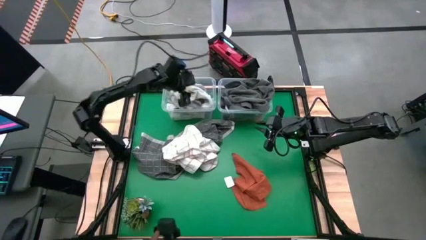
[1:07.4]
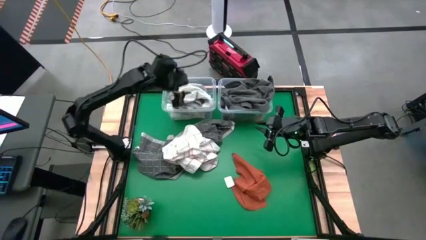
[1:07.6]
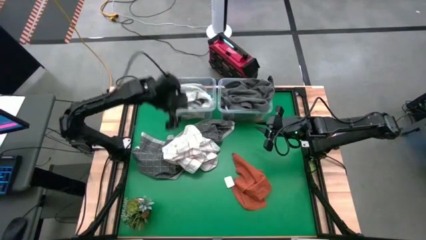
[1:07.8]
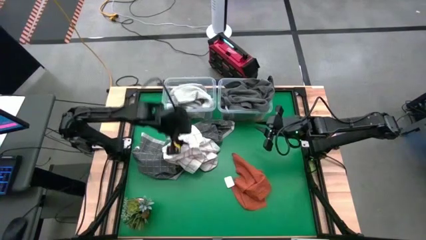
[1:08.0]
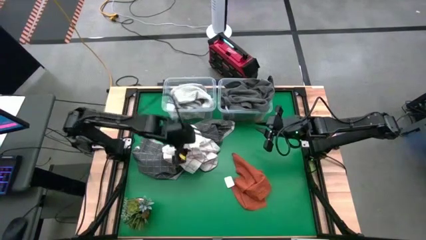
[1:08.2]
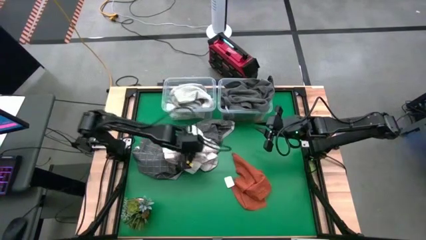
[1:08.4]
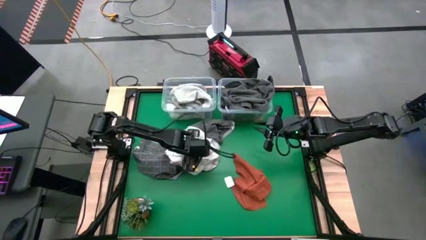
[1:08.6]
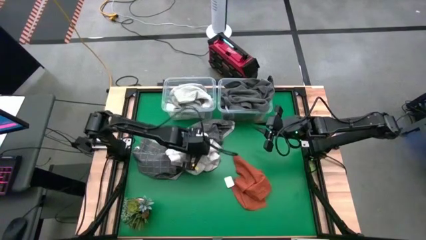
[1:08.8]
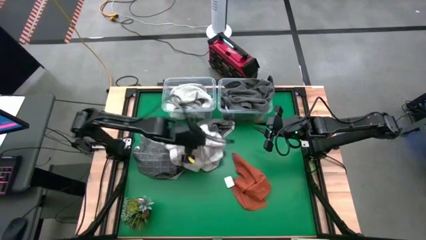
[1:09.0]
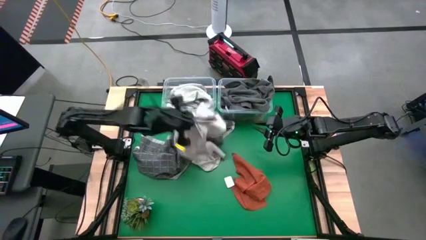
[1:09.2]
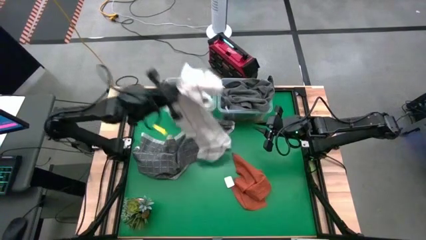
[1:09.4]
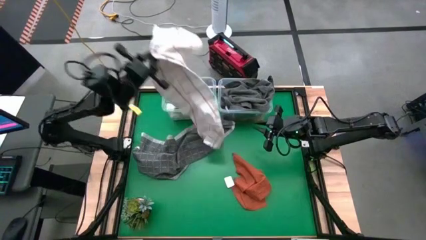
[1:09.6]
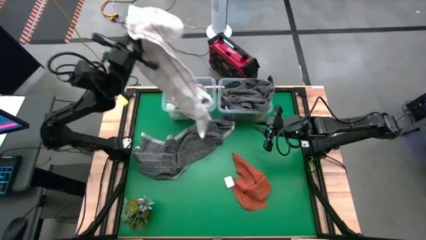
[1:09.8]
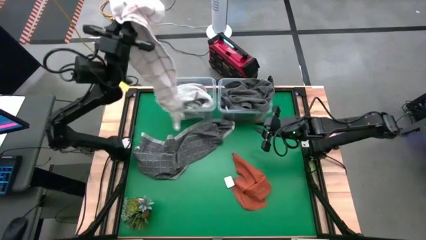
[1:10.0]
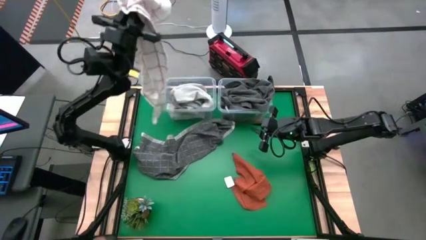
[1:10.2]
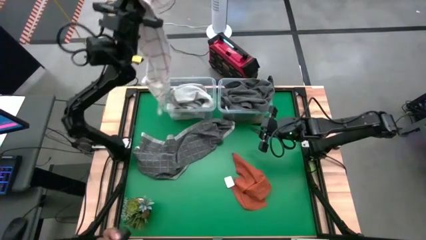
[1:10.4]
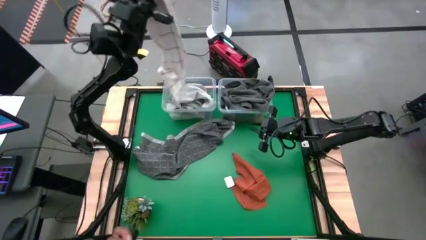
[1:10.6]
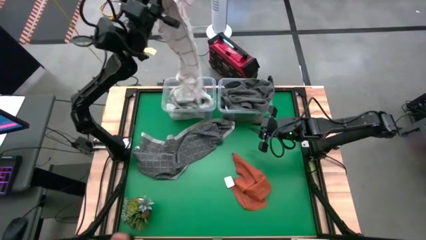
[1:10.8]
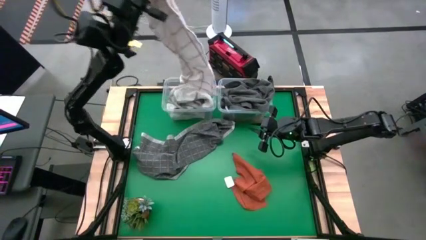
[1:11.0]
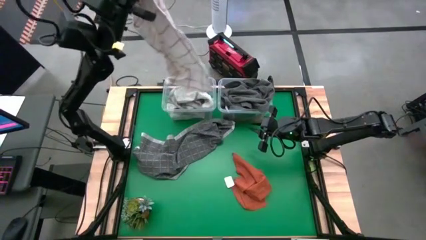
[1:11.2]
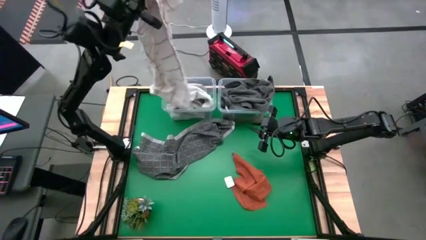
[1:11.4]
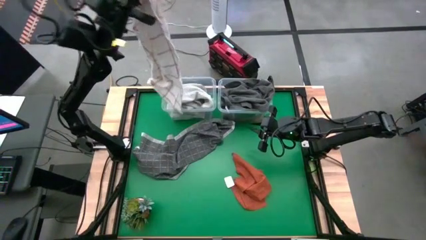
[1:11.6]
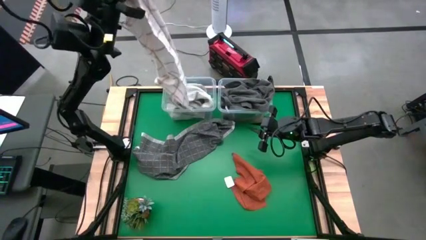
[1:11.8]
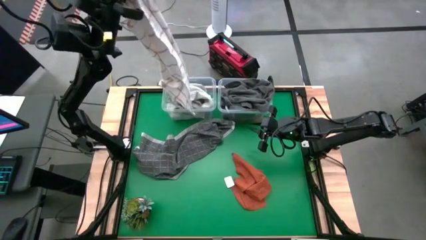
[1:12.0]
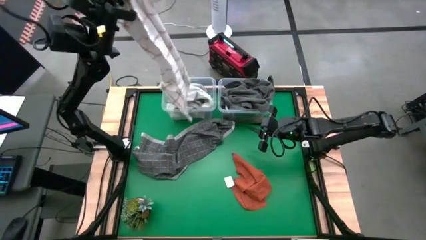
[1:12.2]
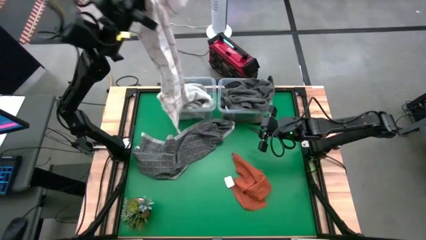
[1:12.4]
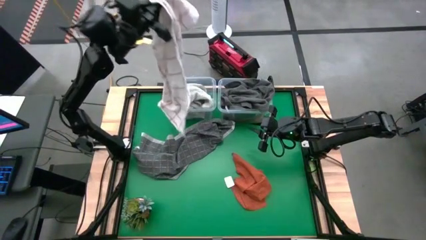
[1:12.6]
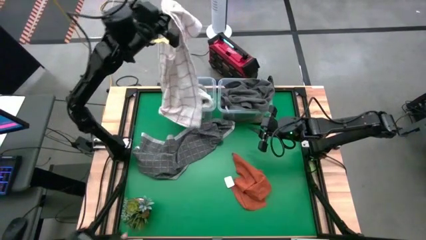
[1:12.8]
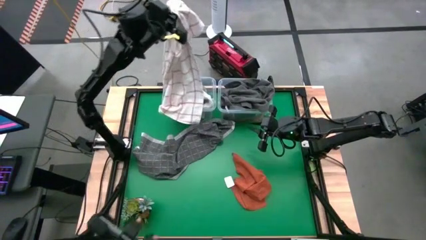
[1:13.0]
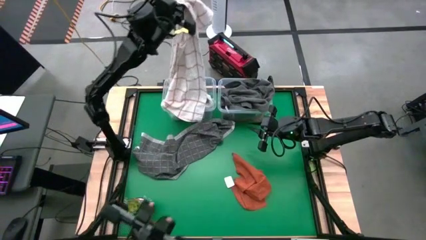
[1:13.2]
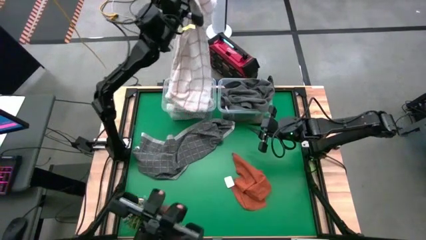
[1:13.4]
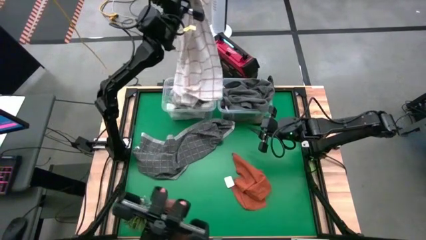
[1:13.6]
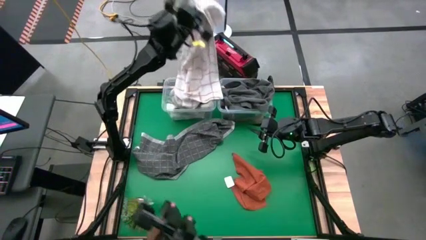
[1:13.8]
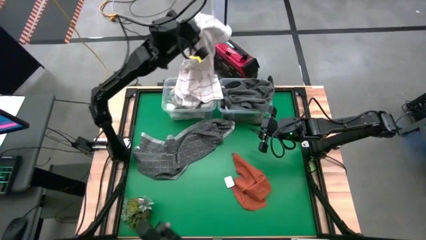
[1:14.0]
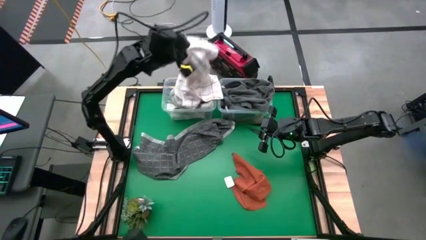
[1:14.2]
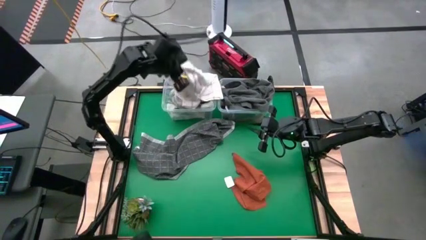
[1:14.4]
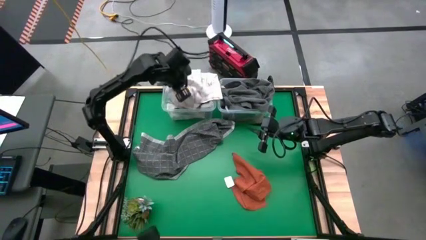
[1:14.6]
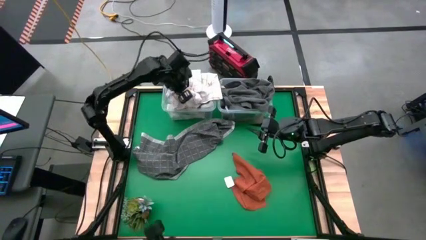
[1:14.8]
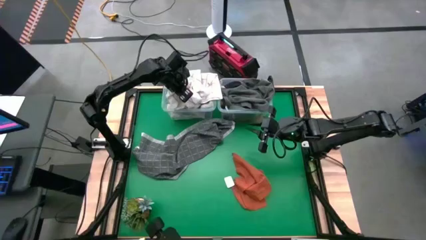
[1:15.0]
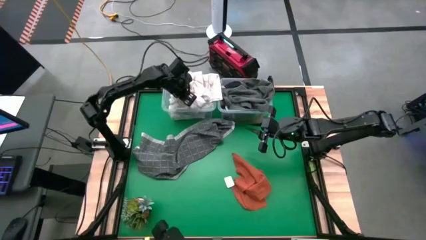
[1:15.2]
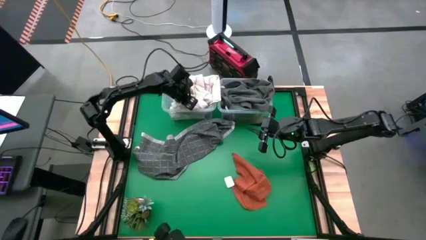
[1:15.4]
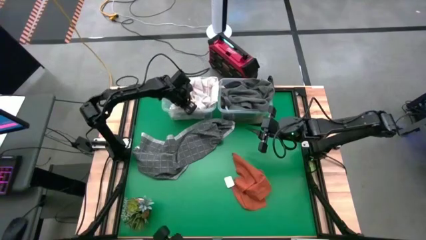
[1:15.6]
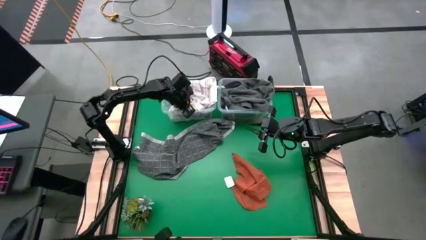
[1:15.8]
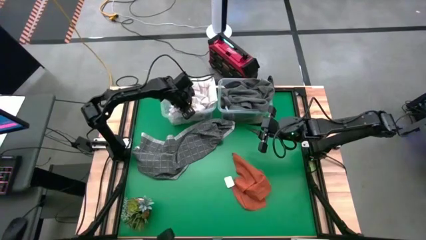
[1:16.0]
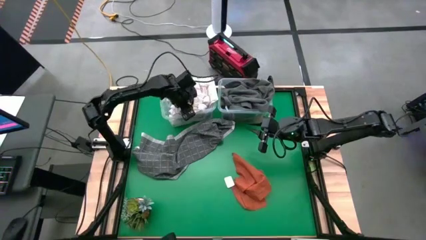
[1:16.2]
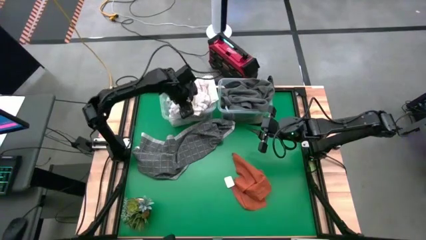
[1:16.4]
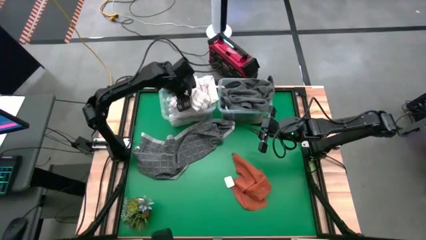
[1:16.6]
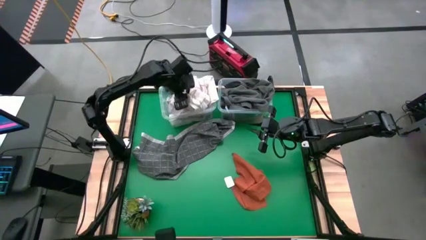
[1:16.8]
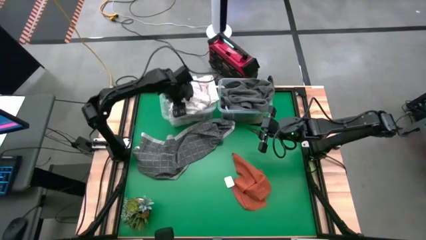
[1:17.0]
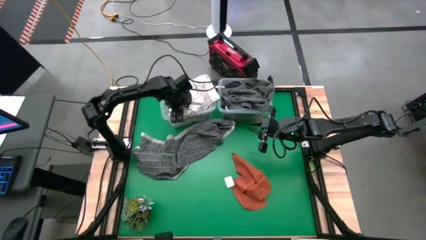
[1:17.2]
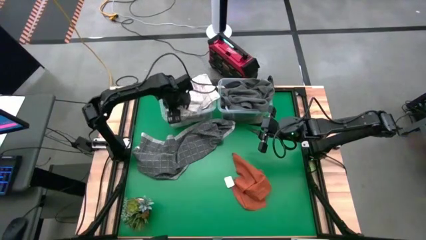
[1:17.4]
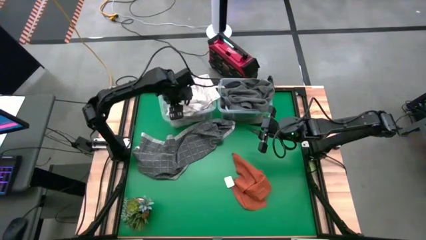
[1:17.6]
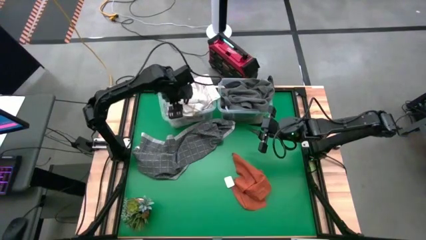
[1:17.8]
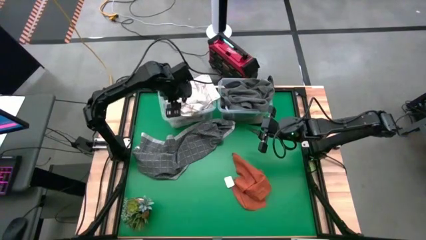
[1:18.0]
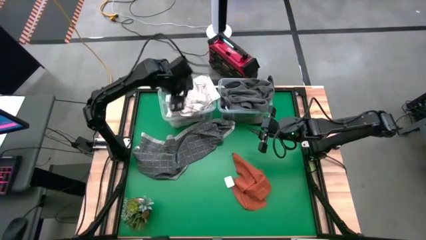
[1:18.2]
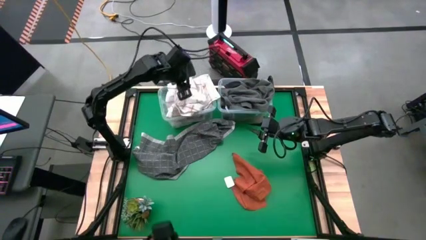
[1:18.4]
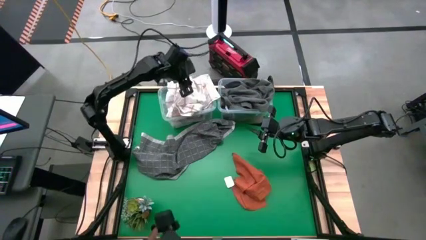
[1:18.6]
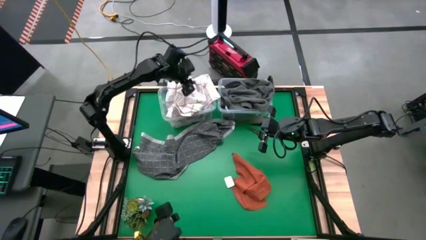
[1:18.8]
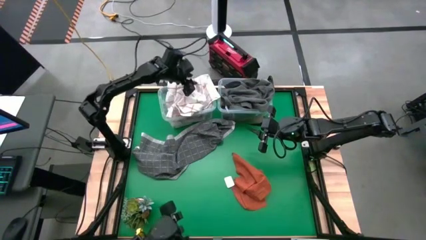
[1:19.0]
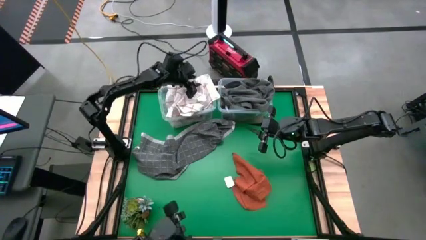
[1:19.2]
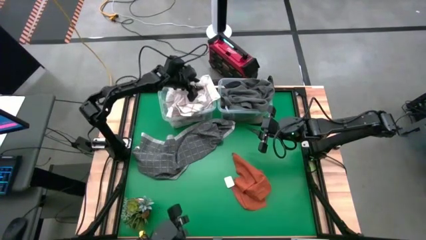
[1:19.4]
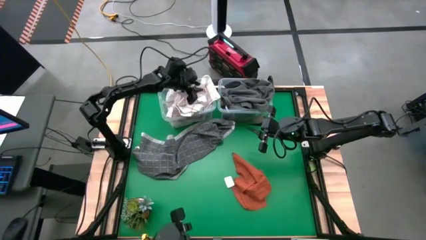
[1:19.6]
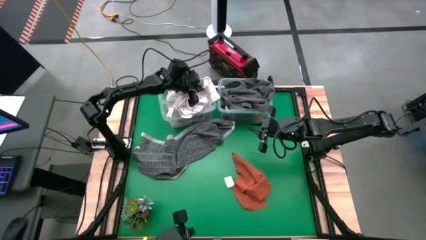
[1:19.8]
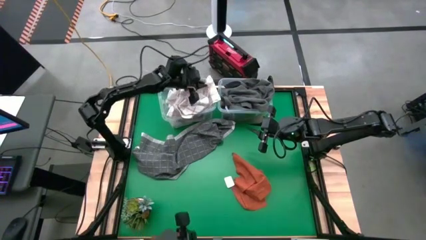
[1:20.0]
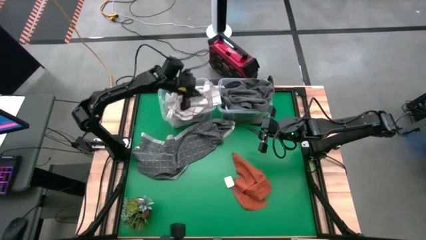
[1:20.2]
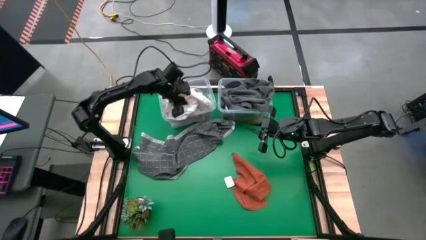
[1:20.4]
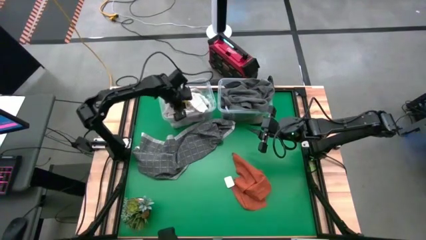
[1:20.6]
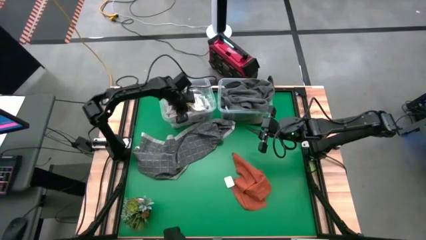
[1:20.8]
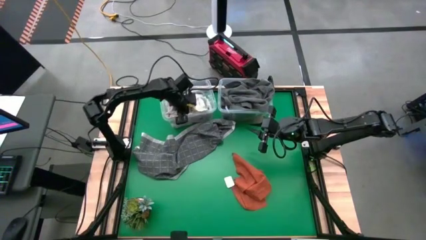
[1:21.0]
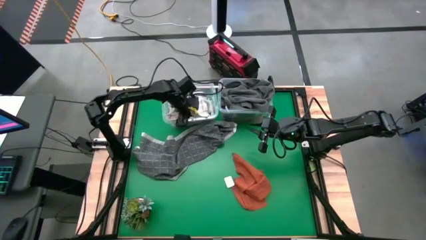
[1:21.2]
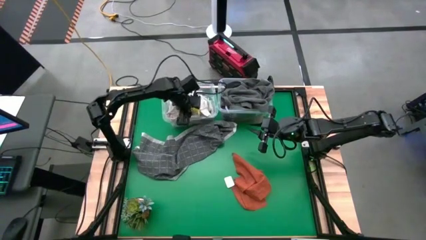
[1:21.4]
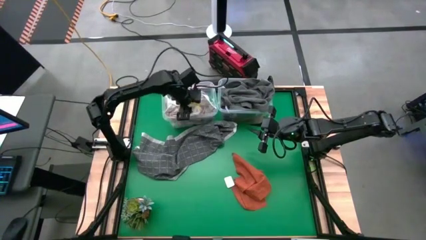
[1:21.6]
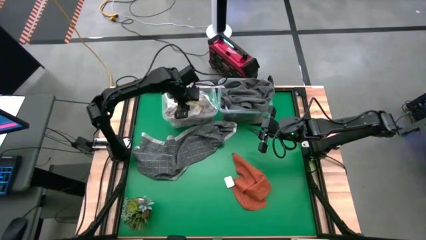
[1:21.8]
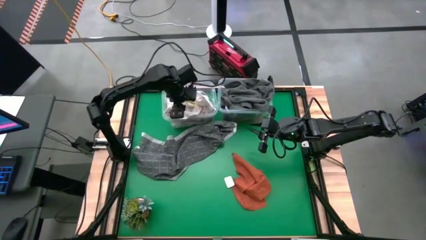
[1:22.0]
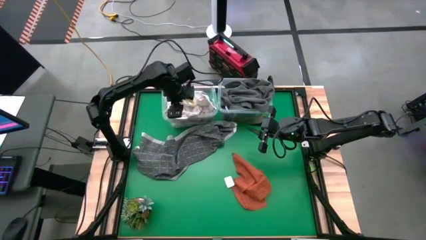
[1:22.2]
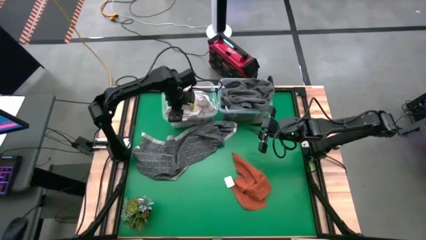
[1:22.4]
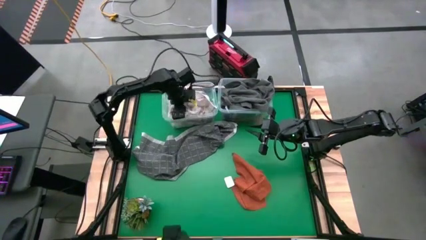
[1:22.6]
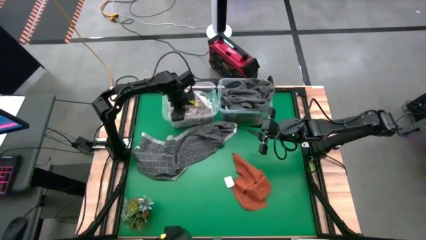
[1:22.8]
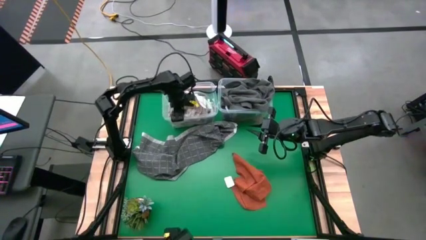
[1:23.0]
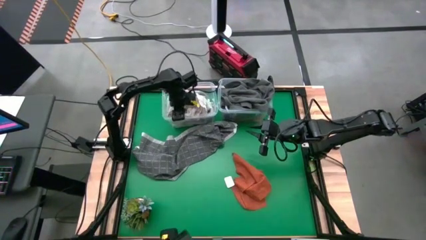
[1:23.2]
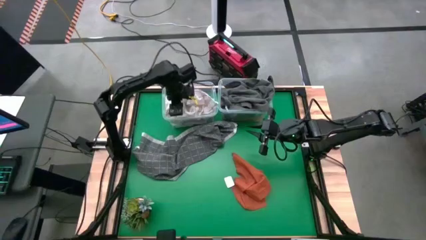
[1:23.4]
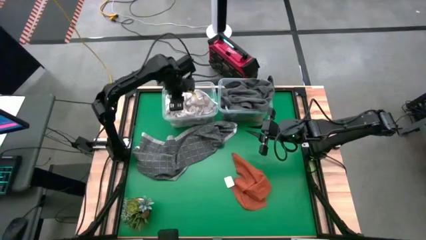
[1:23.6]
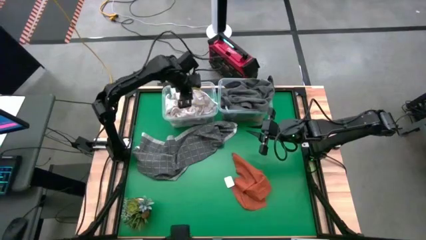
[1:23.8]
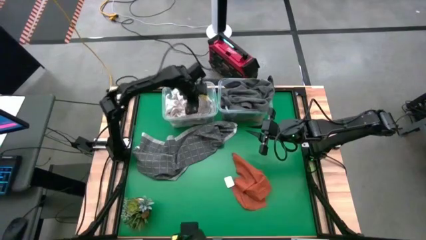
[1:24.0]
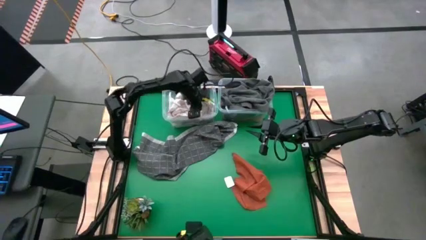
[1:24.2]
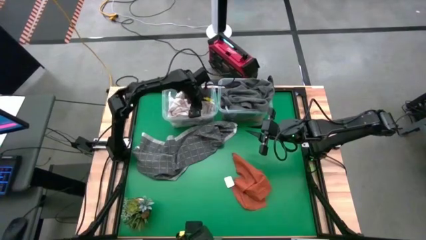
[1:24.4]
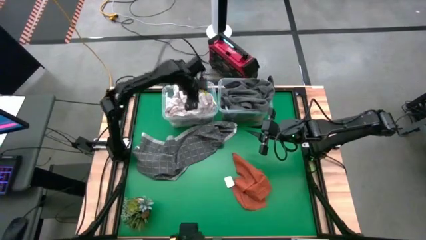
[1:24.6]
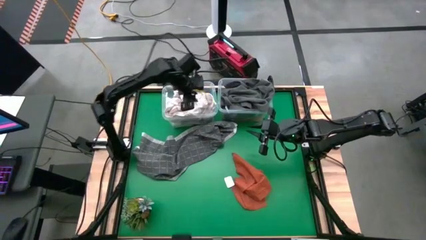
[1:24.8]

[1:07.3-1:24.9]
Task: Sort towels by color in basket
Put the white towel into the left transparent bin
